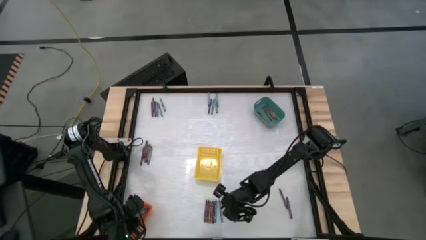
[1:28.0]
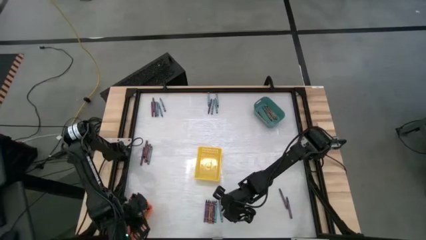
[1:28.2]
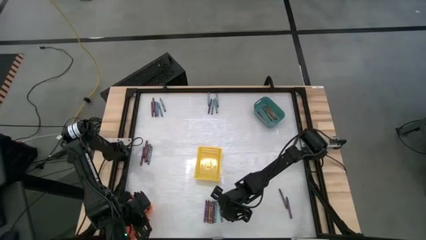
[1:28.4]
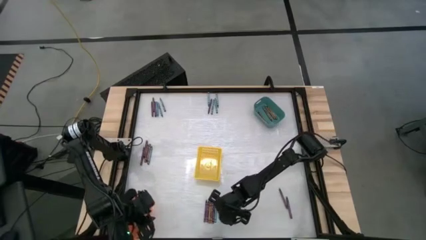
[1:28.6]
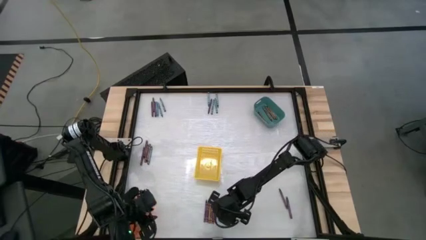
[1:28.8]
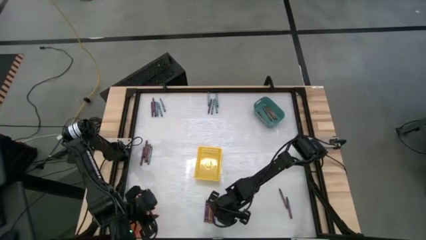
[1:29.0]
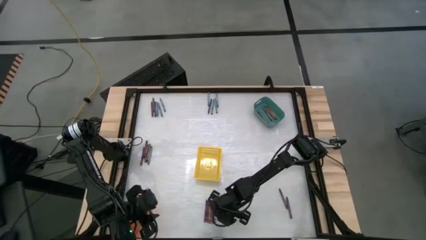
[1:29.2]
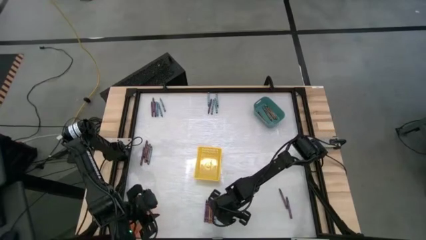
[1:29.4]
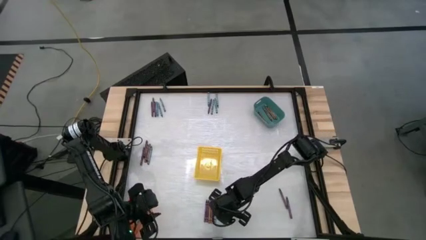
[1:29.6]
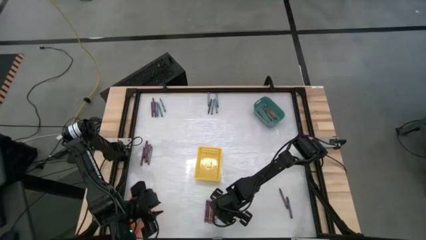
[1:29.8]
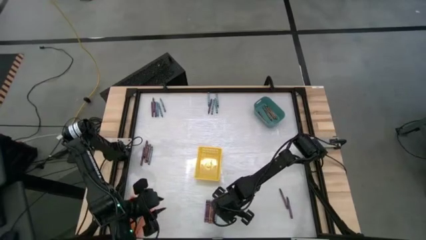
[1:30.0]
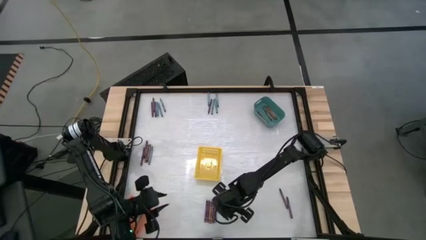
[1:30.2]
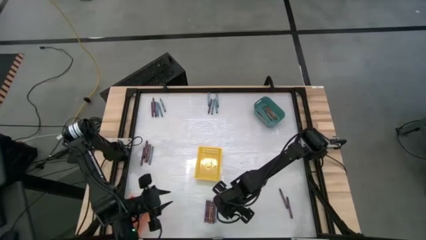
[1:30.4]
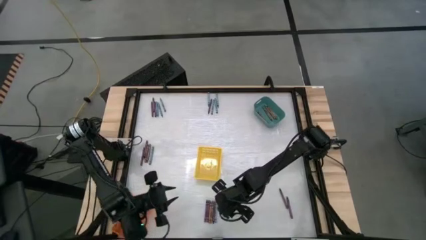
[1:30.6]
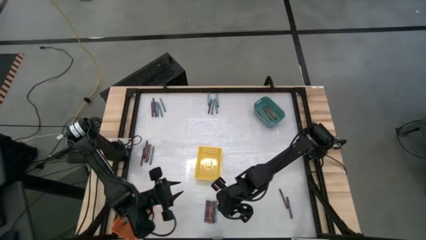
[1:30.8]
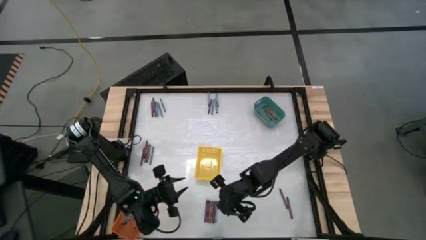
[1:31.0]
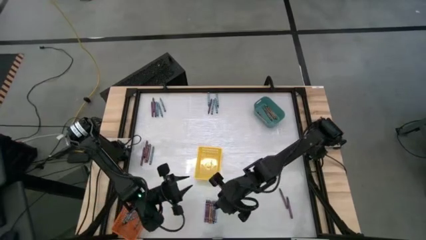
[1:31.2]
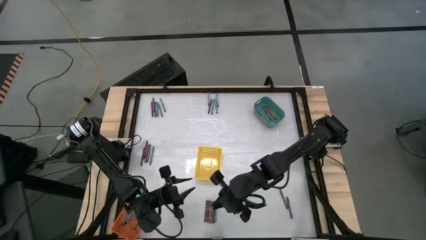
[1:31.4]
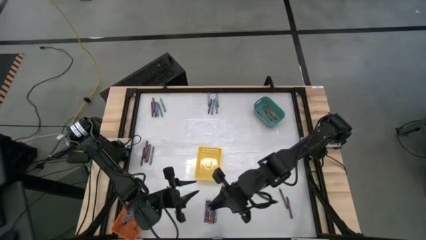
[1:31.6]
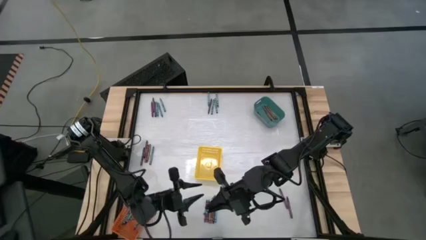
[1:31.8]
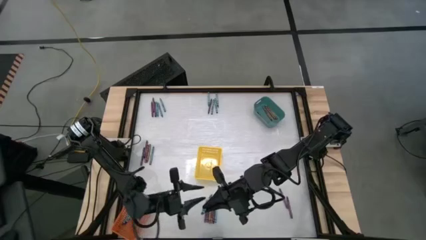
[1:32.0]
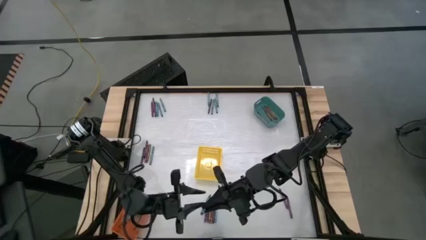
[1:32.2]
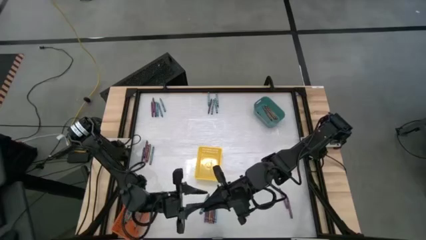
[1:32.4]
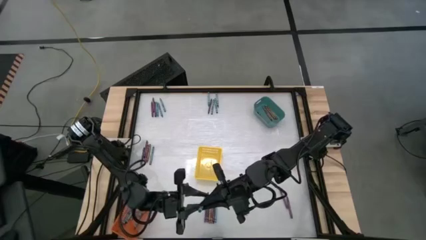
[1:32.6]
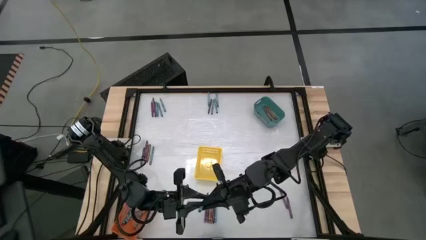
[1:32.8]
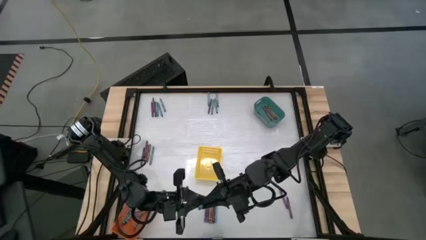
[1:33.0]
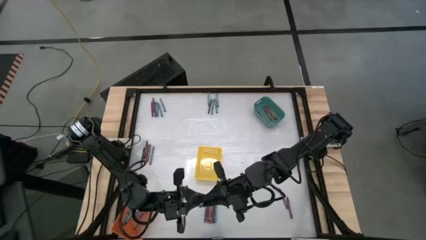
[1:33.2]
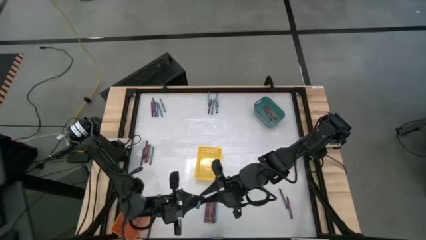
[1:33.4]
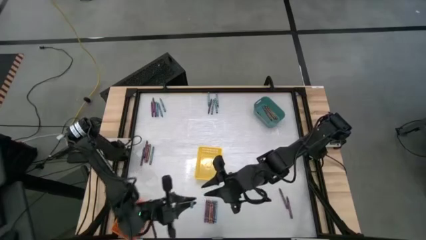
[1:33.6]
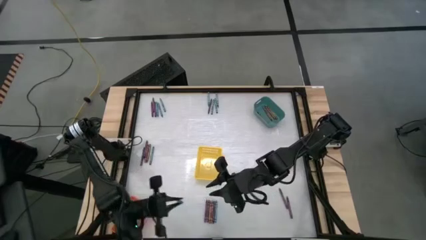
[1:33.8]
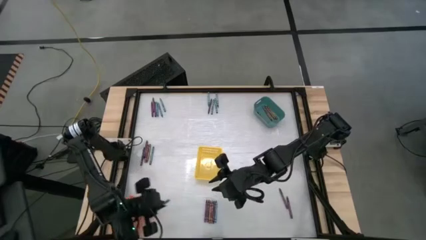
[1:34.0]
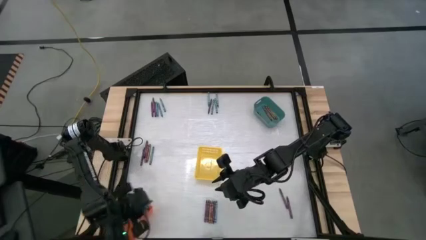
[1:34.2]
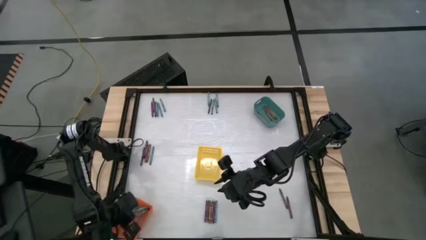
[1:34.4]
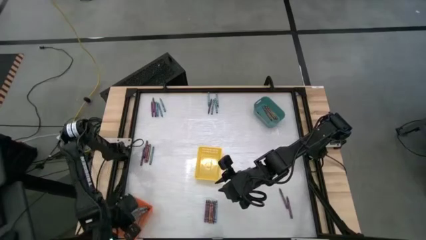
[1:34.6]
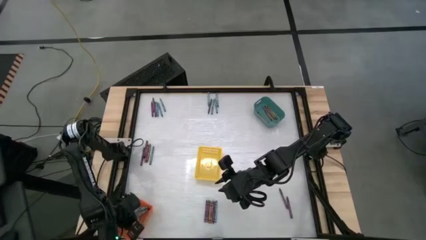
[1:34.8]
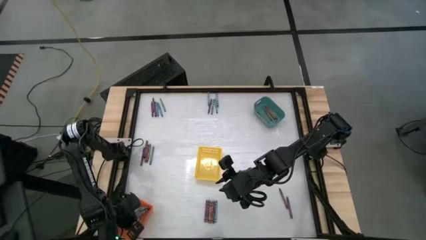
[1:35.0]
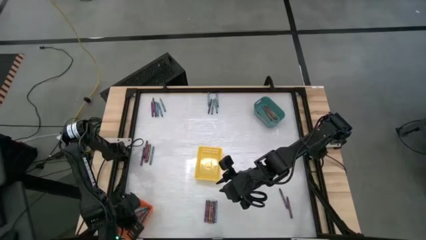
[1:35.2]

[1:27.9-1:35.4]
Task: Sort crayons
Put the light blue crayon into the orange basket

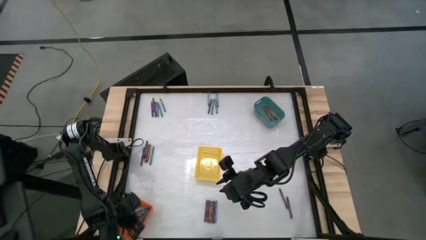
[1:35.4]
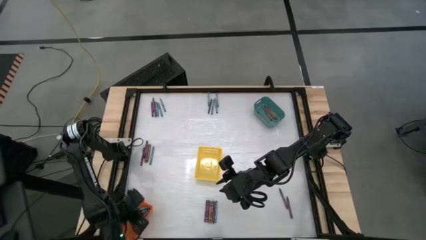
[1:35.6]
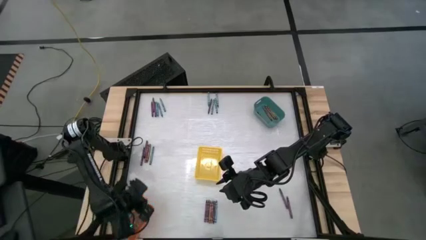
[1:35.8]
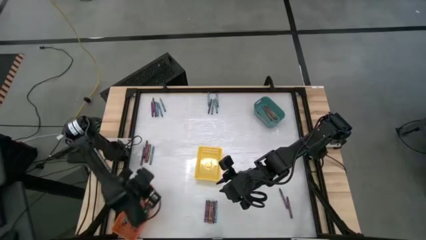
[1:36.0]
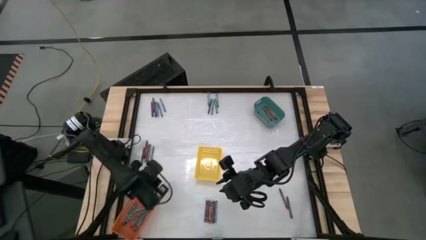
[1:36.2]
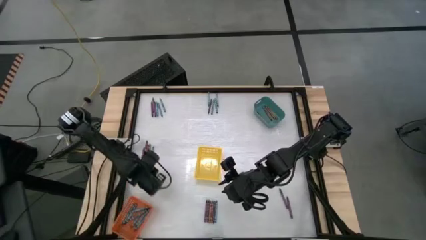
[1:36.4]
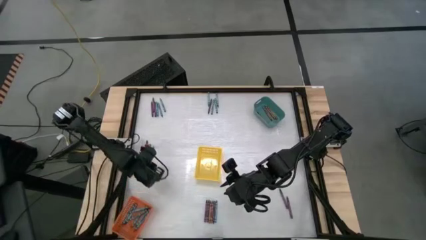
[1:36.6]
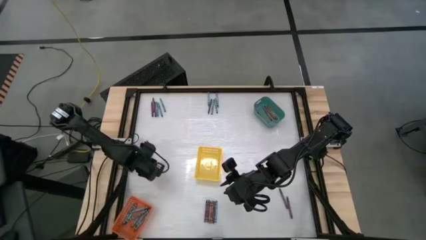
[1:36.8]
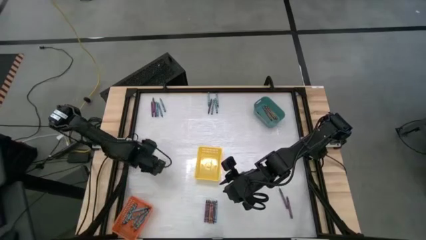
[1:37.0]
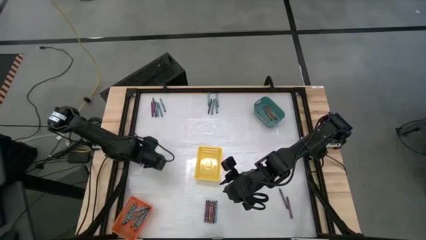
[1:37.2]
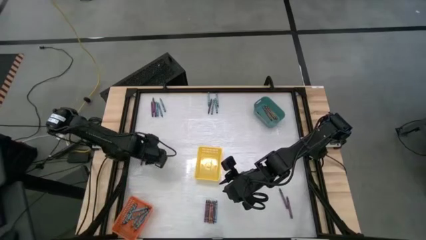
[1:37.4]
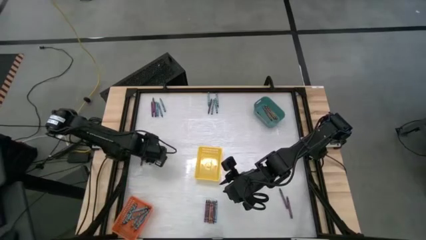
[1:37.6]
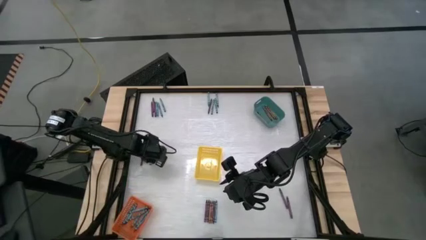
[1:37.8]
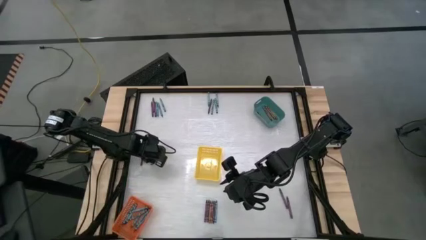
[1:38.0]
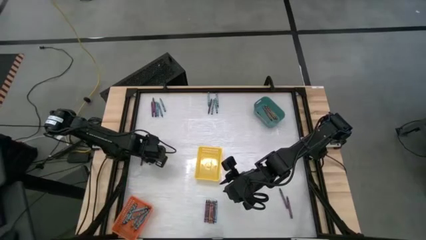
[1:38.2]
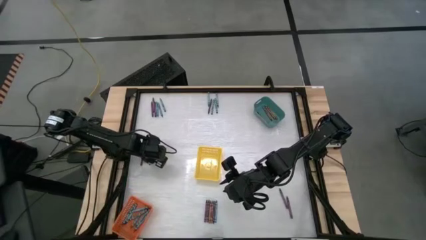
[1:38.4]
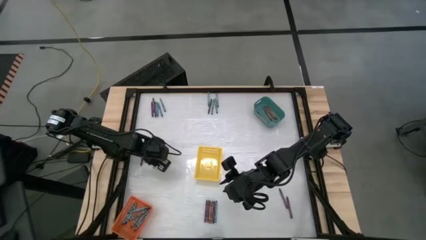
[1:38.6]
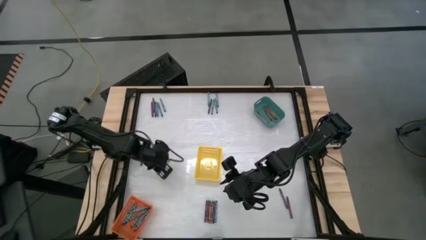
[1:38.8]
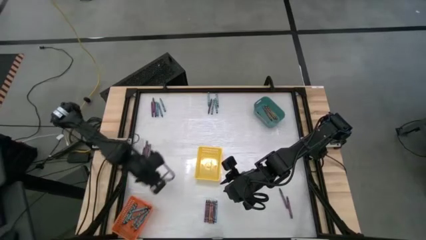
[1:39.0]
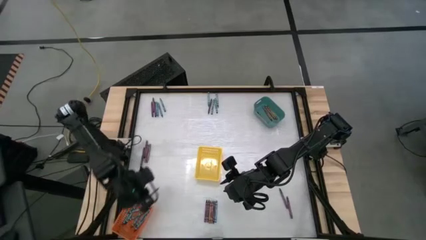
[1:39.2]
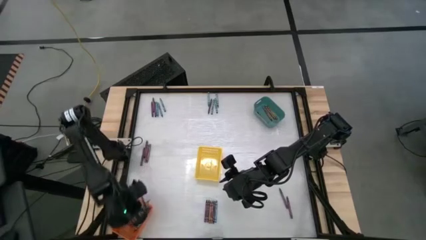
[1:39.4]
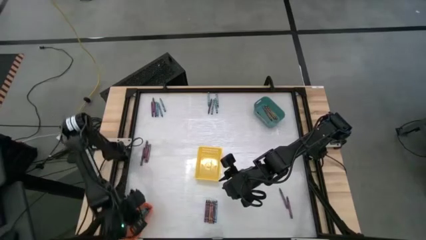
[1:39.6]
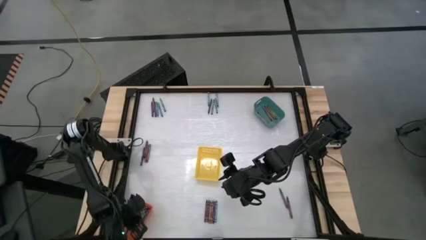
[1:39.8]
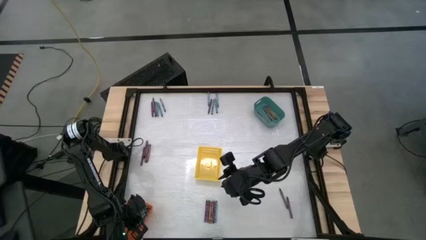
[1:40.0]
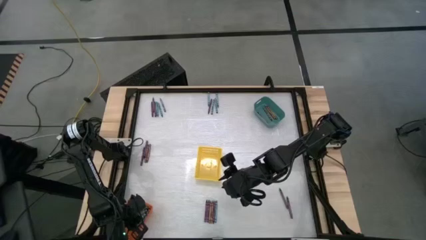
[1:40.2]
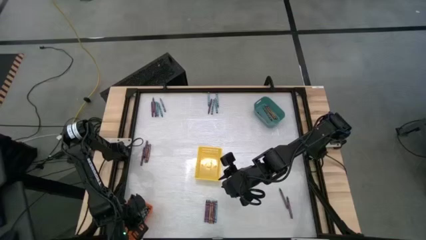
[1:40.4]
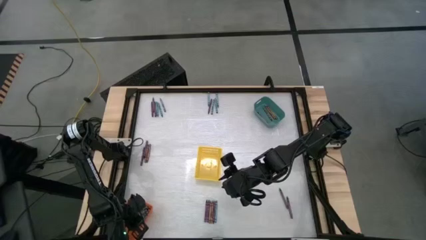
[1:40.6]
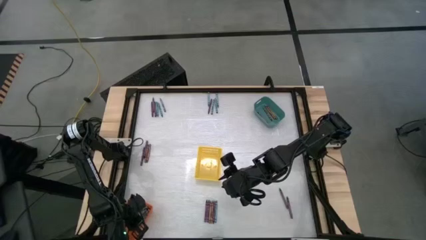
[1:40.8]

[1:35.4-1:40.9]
Put the dark blue crayon into the orange basket

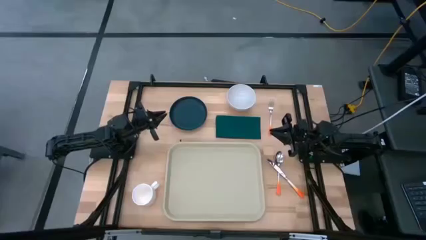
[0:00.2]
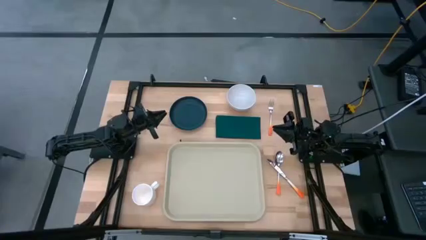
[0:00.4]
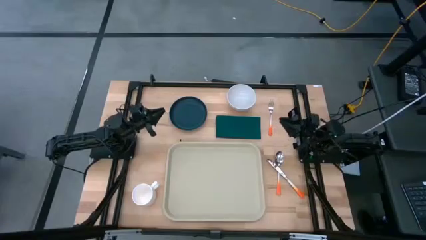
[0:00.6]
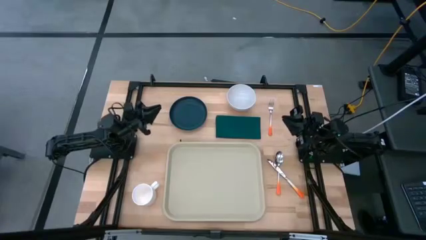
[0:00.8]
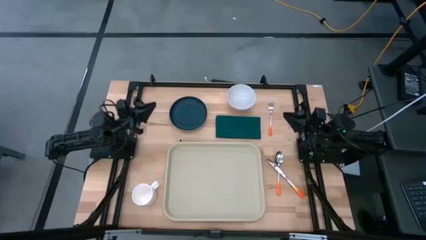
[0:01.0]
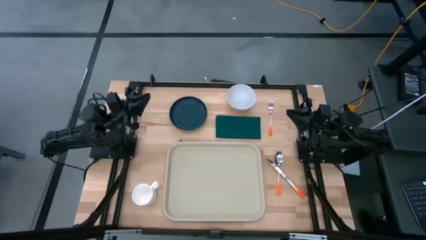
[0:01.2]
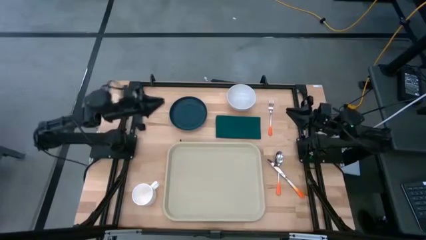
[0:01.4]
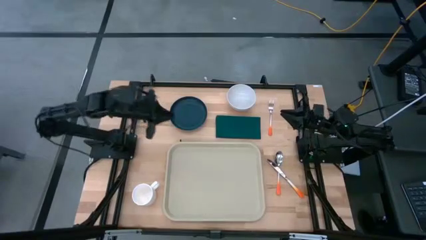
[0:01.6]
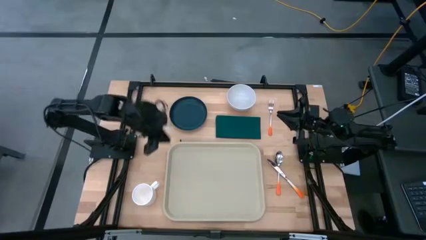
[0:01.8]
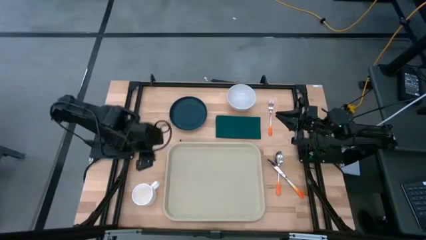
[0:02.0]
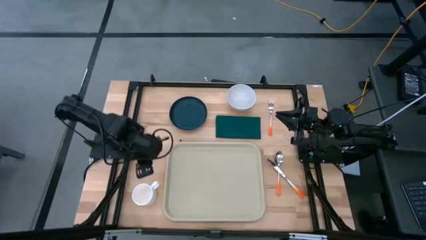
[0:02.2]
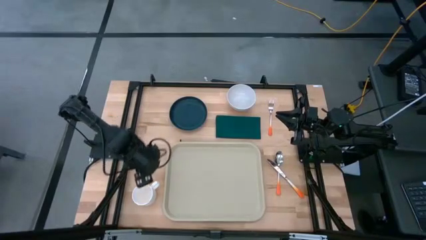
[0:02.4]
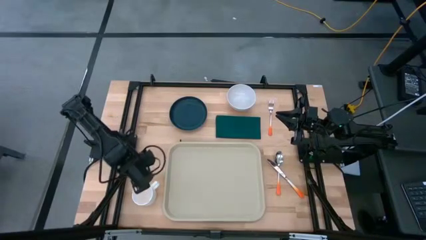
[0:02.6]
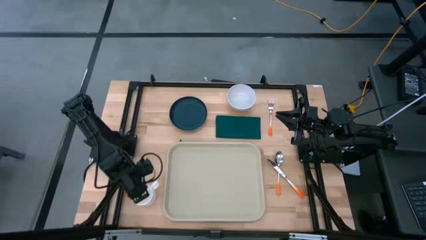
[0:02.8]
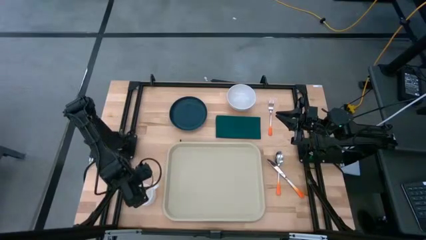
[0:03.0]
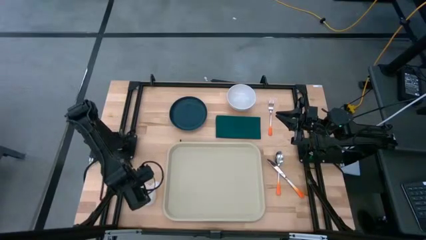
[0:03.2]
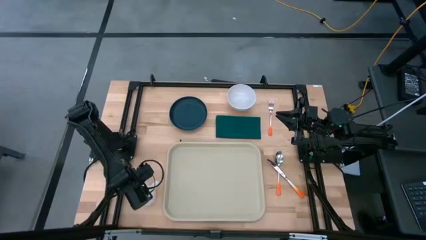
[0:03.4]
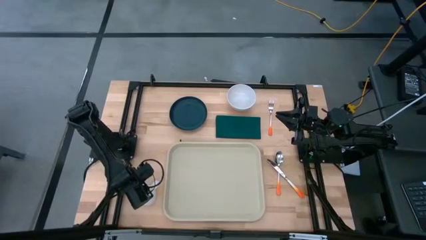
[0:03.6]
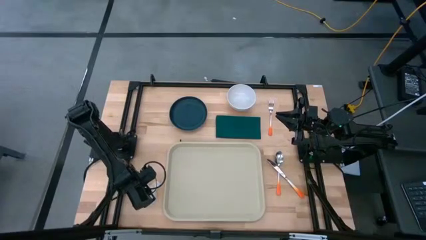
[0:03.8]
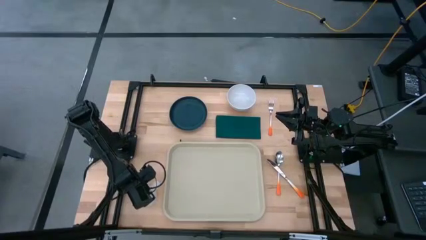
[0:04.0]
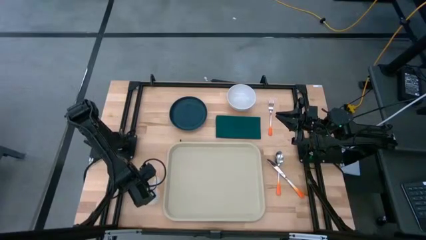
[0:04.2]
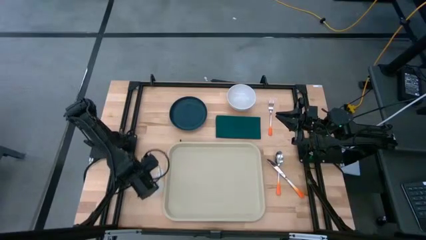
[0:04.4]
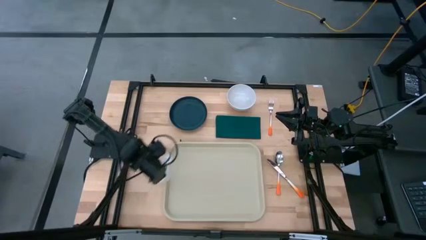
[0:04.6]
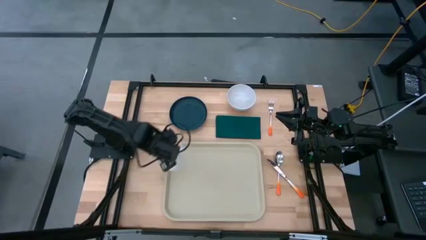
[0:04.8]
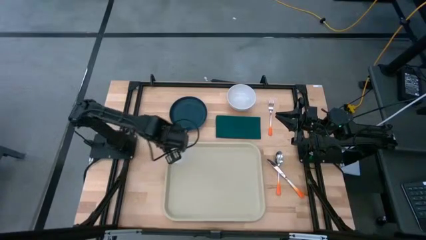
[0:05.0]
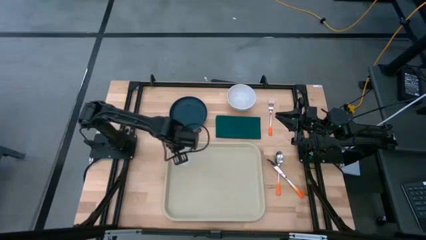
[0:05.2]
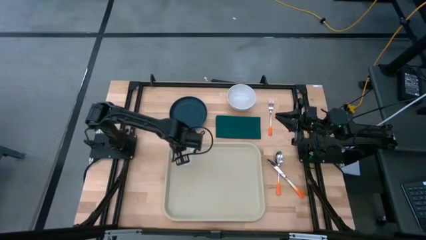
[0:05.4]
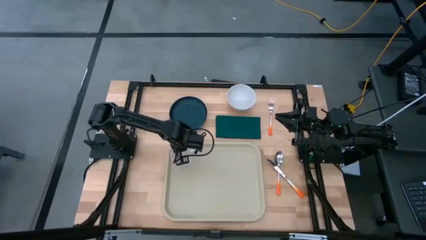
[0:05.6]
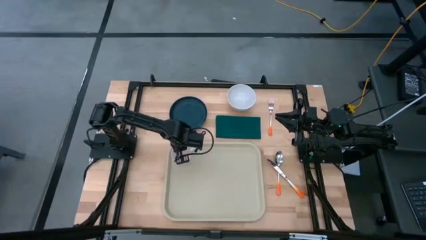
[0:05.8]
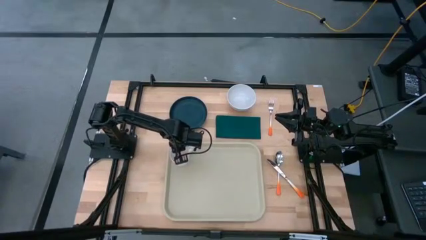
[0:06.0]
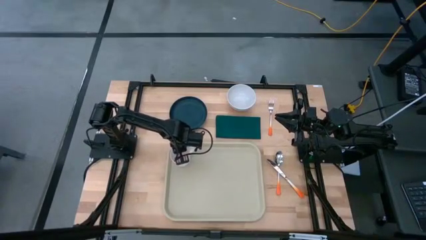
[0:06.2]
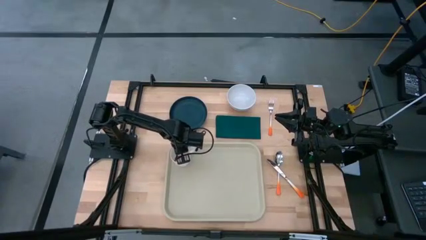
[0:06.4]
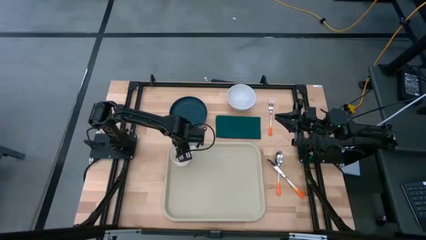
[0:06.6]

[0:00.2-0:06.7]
Task: Set up tray
Put the white mug on the top left of the white tray
